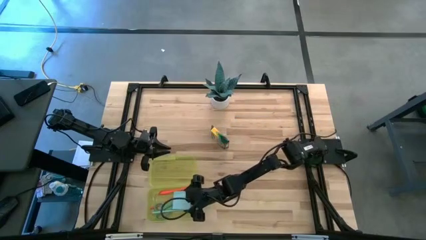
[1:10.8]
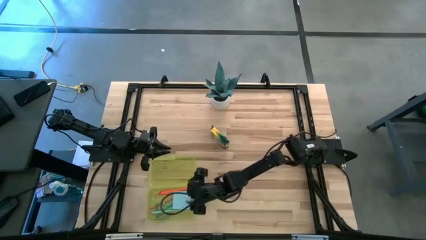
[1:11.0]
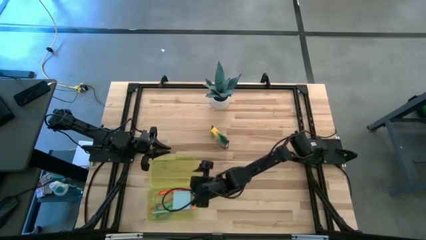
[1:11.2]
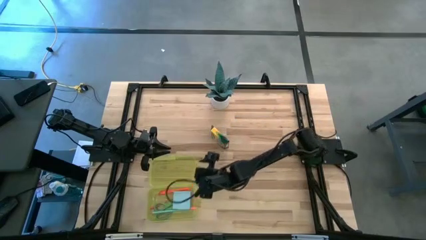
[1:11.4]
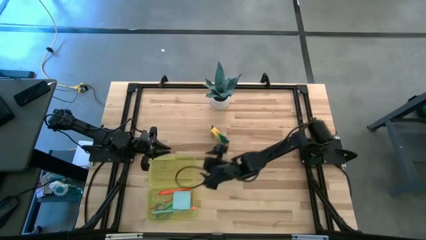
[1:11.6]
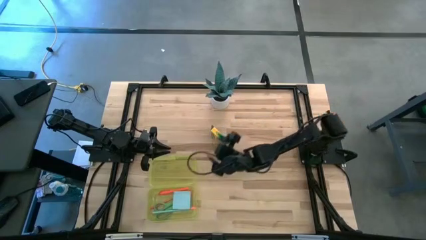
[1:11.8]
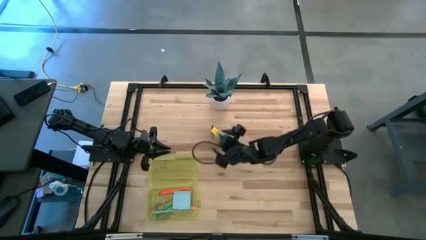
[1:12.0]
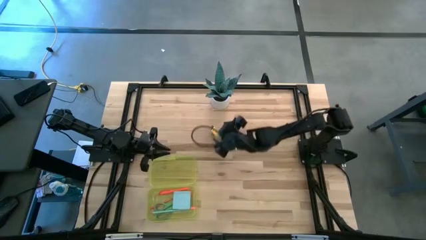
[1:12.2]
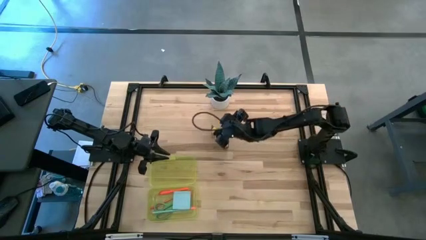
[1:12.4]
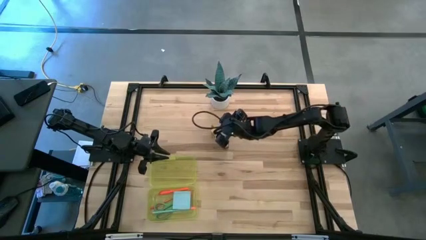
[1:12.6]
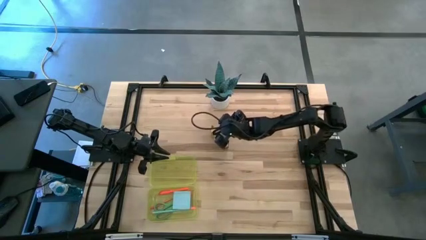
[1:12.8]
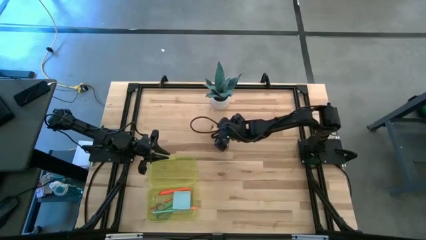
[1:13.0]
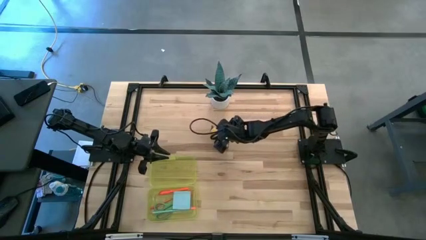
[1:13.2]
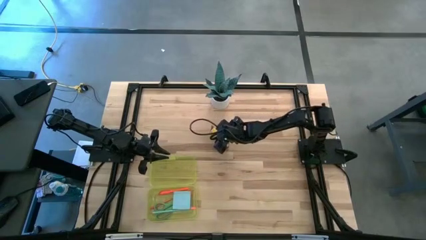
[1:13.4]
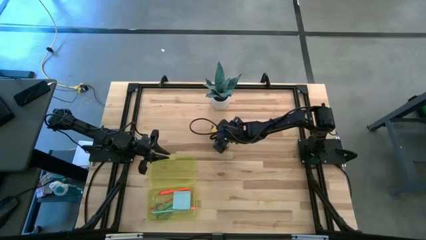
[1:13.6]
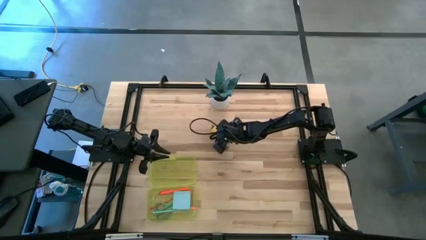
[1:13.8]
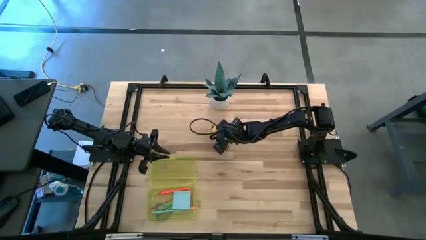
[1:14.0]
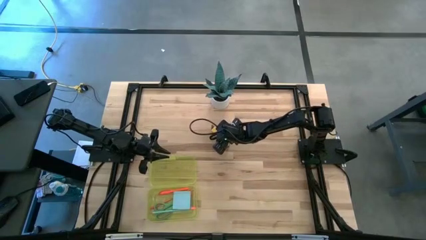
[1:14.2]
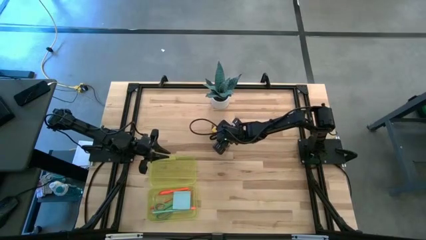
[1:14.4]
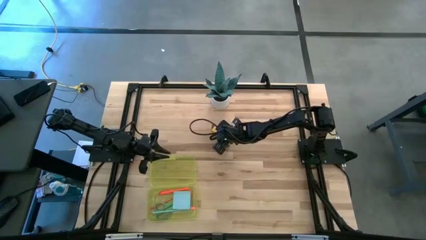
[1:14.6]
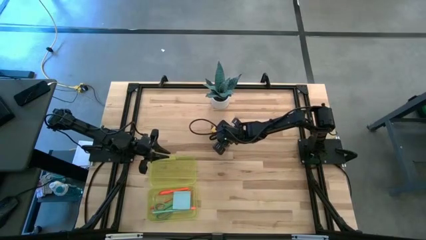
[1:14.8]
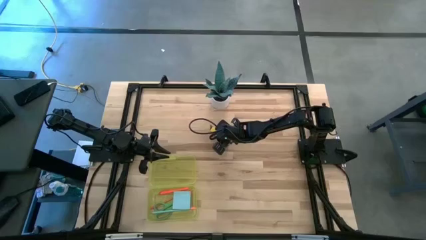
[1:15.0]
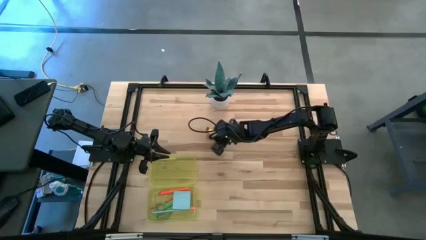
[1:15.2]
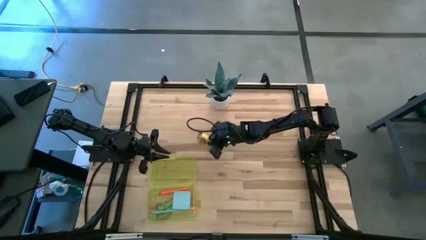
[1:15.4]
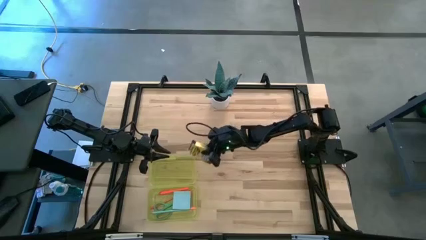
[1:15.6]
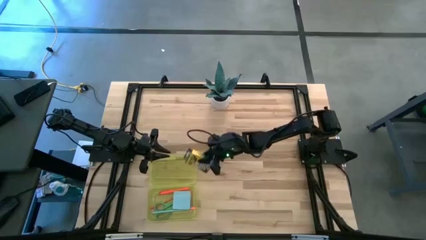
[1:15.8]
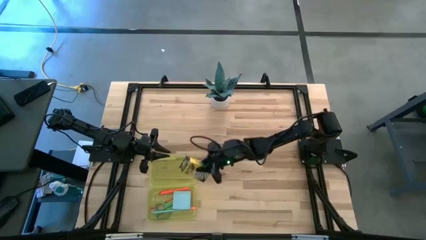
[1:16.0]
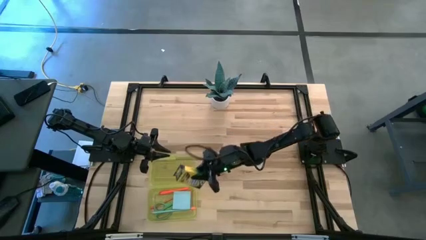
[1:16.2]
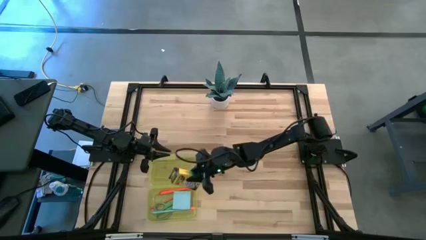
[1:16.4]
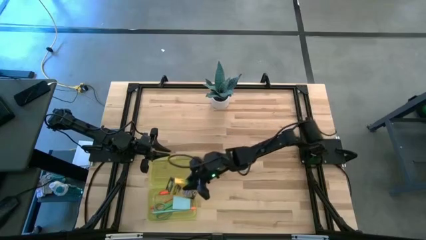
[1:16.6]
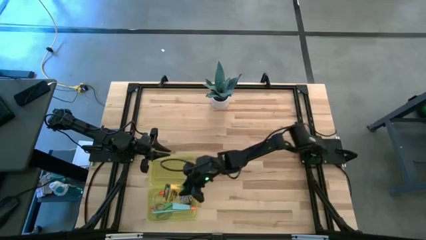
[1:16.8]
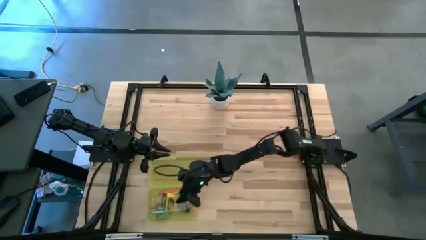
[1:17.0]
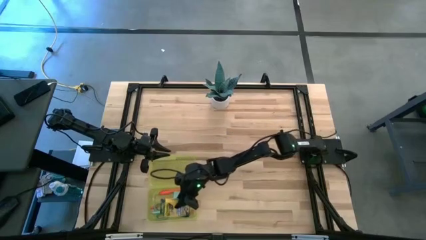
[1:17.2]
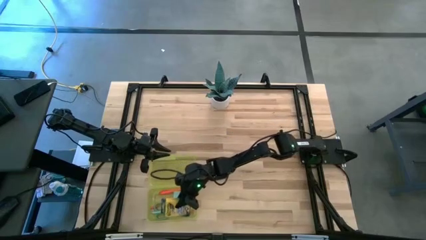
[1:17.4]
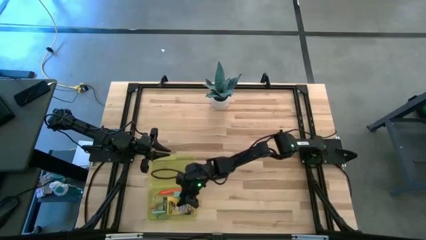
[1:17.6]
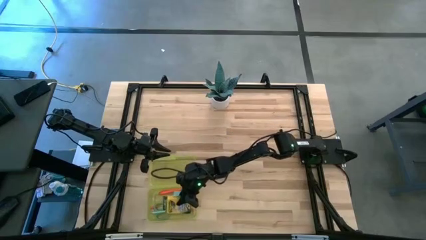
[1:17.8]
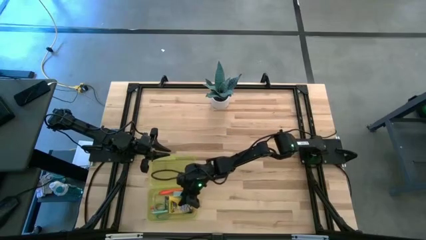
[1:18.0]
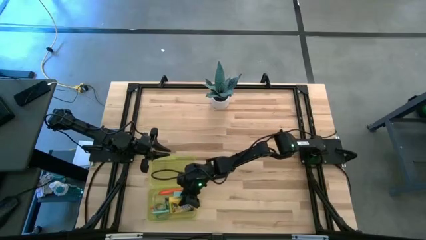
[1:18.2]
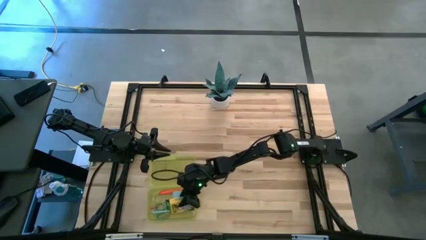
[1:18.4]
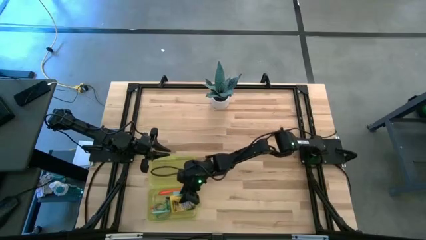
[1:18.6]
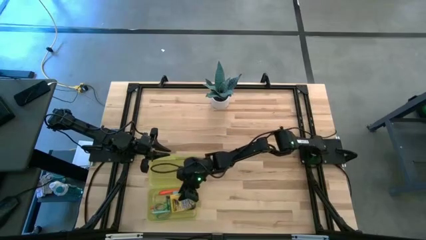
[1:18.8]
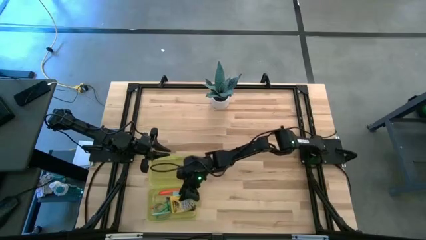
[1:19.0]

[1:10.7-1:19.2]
Task: Pack school essentials
Put the box of crayons into the yellow supply box

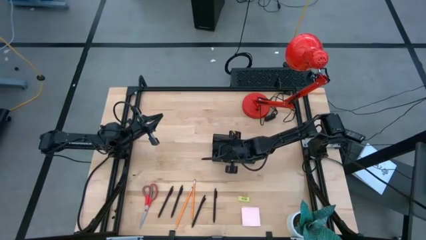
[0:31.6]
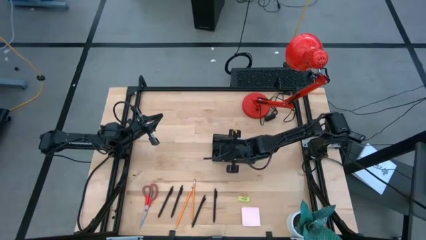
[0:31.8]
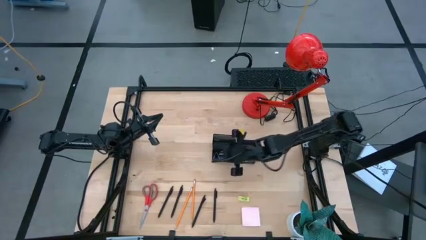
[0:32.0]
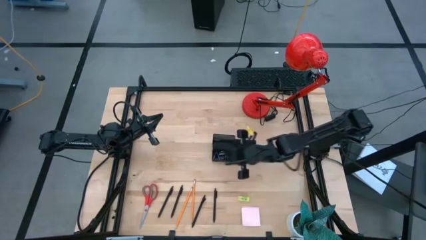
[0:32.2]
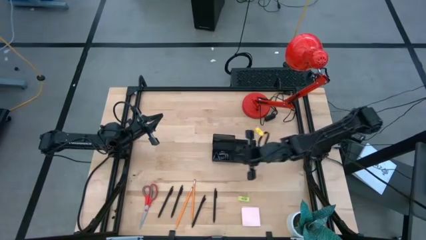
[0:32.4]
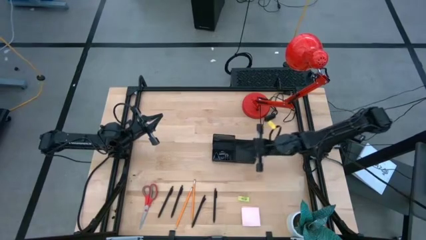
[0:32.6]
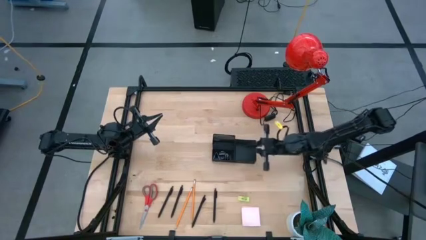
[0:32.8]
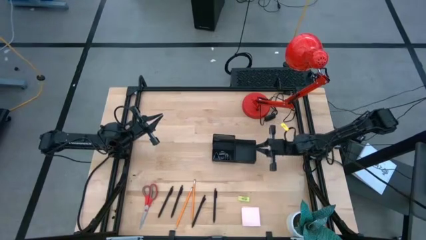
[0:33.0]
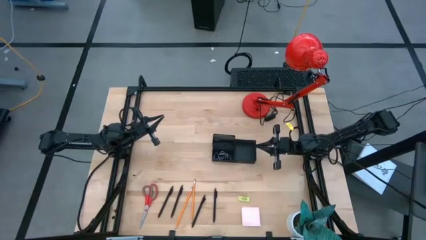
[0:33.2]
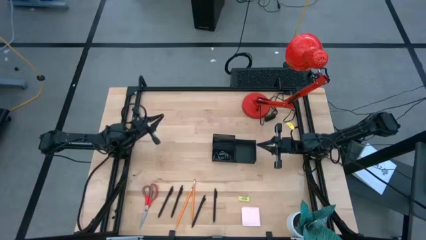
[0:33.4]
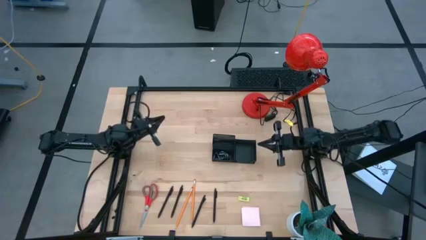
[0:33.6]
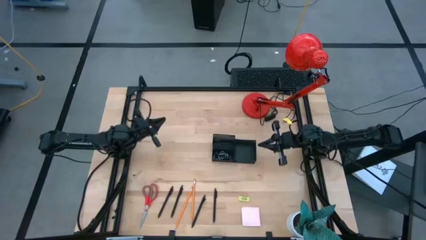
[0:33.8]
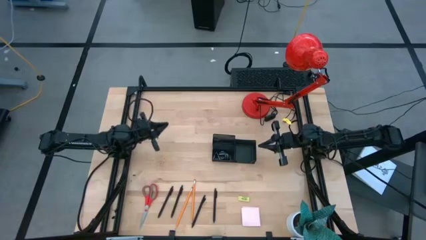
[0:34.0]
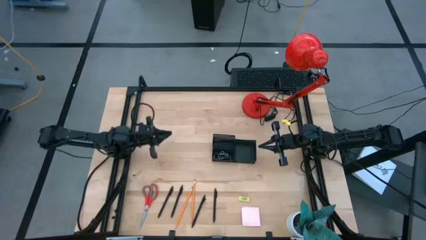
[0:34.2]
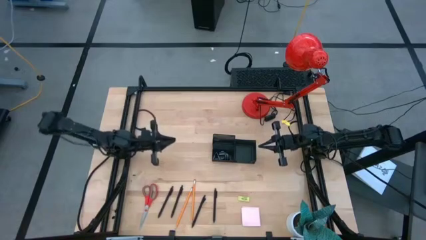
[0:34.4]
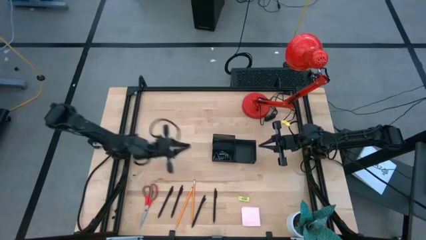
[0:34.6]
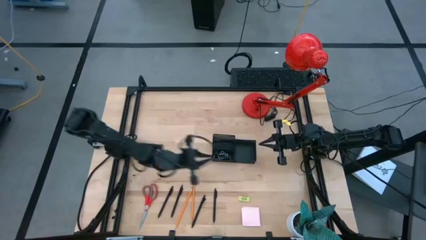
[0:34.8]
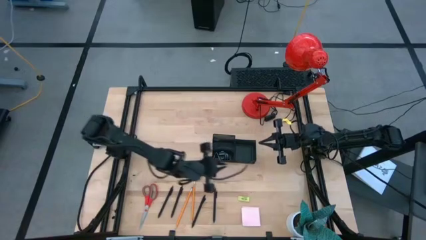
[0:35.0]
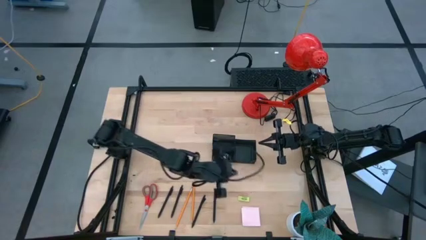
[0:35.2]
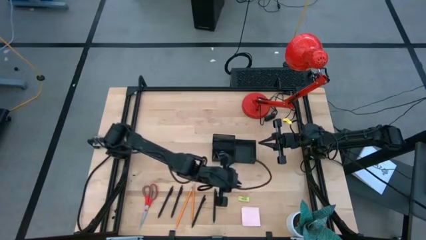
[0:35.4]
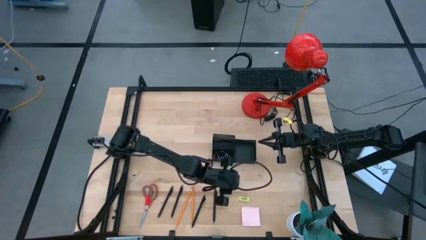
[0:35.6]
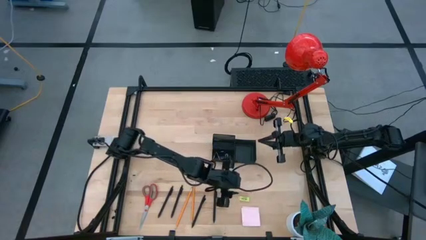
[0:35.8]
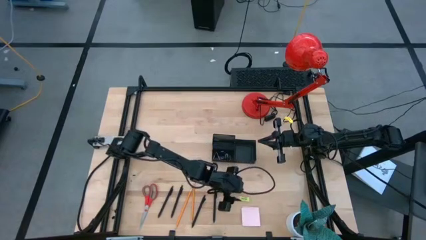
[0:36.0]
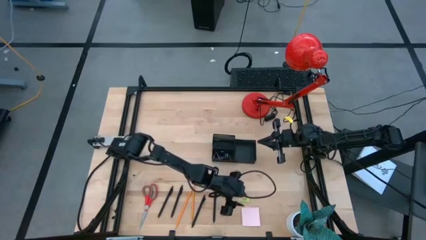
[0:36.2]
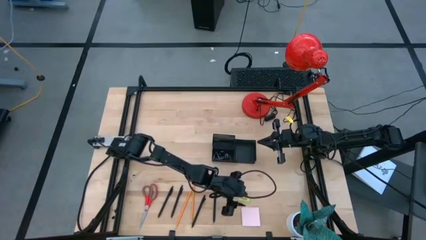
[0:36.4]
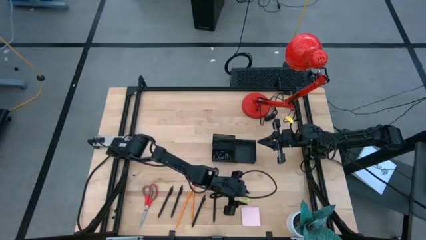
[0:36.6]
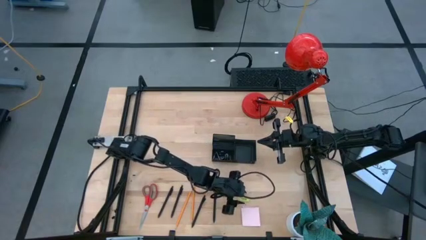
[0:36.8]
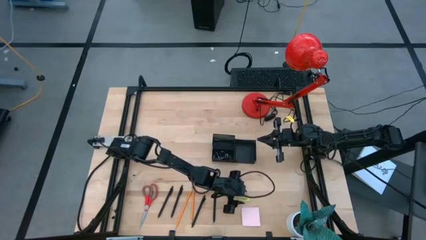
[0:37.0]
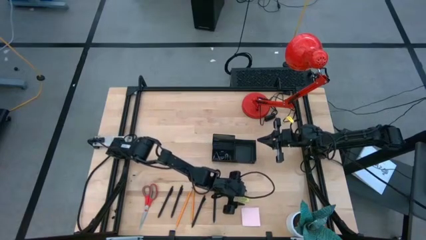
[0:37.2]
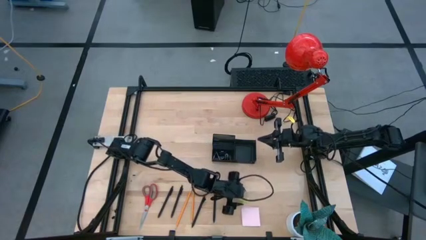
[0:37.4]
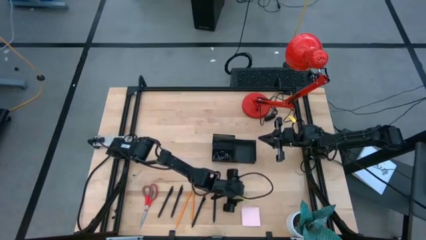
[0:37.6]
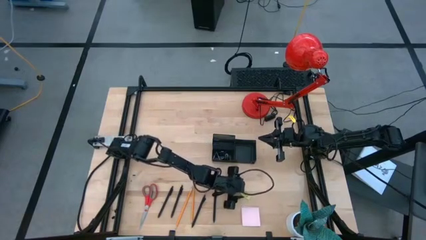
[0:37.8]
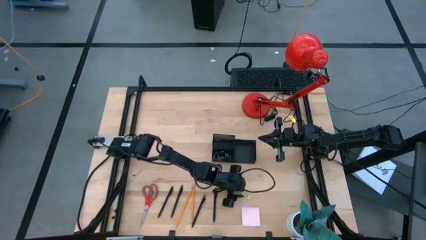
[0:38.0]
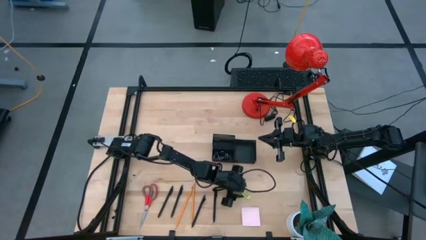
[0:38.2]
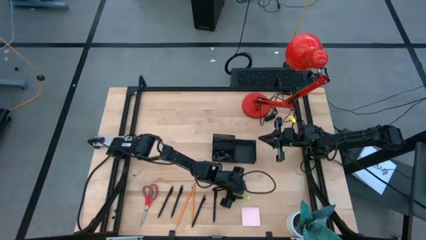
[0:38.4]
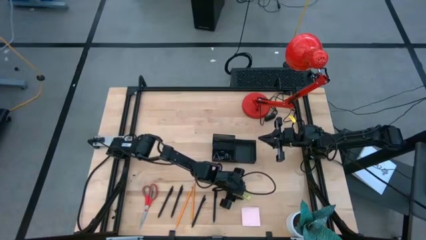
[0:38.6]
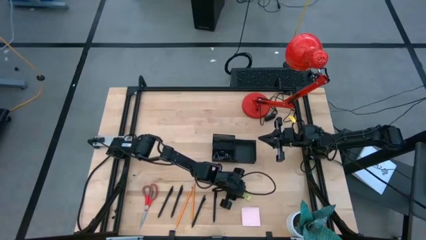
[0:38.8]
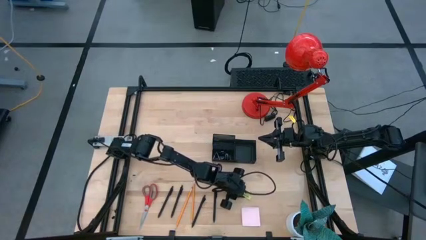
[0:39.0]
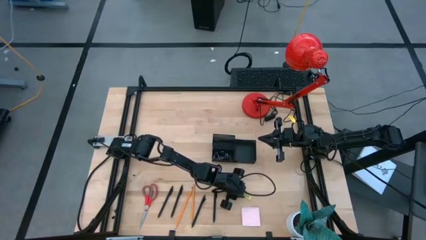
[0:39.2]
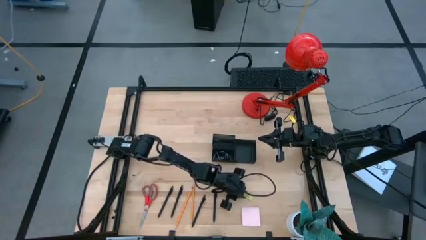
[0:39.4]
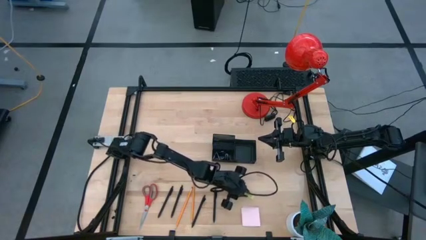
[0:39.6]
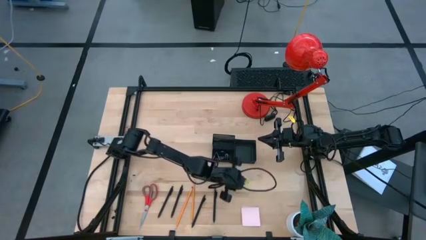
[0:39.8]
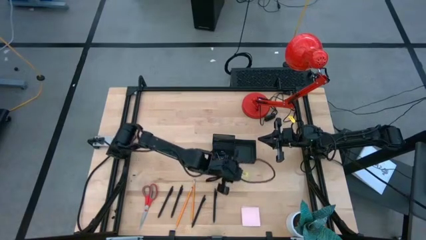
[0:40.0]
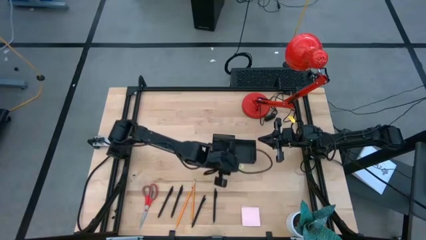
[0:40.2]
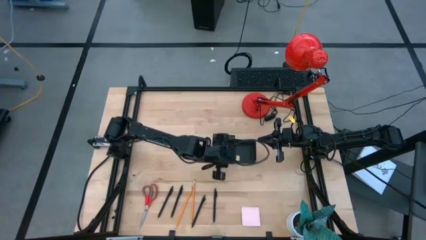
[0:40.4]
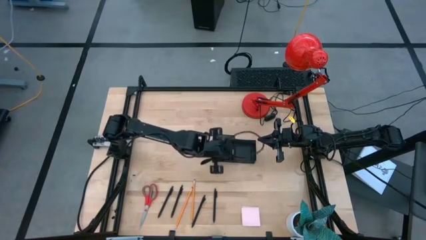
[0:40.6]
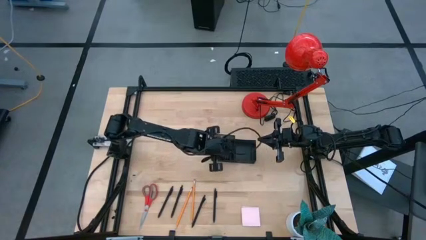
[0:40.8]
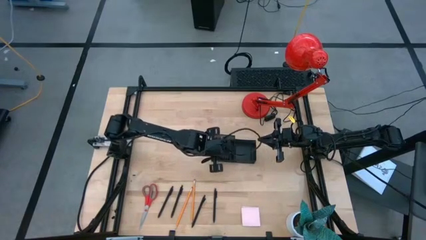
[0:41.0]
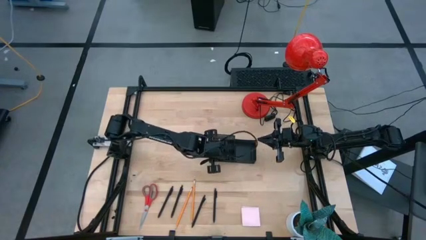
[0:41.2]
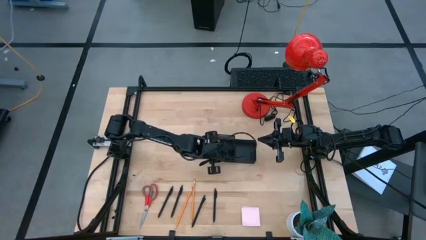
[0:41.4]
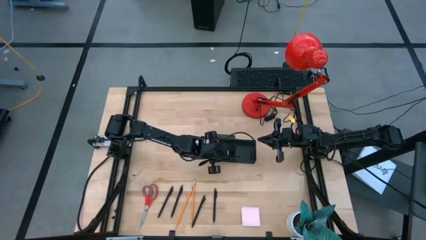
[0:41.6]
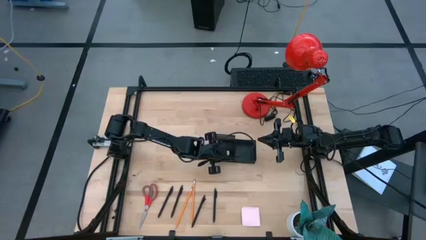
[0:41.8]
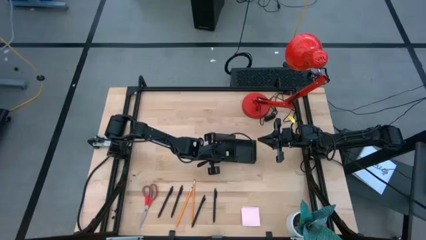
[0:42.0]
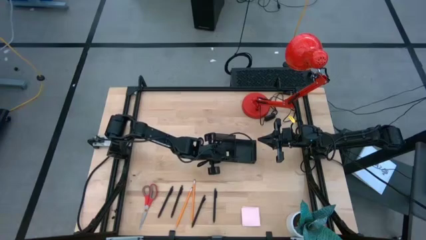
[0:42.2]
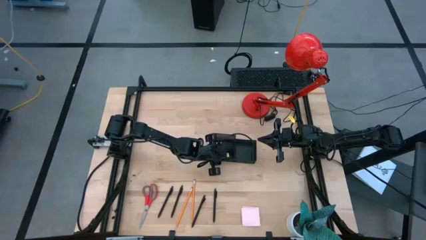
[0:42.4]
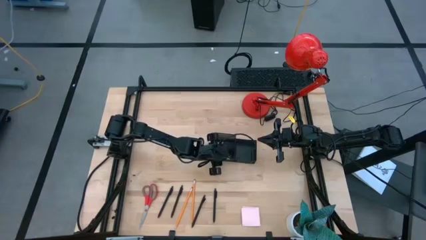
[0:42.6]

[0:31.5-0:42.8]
Task: Pick and place office supplies into organizer
Put the green eraser into the black desk organizer
